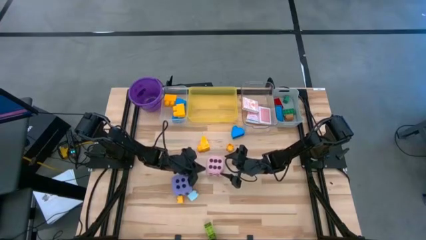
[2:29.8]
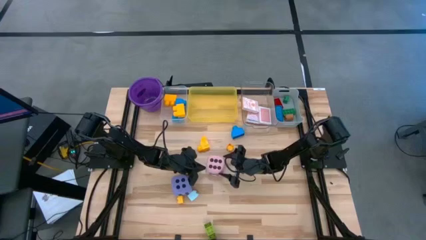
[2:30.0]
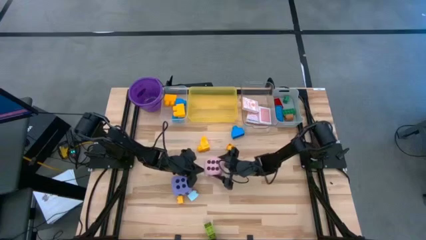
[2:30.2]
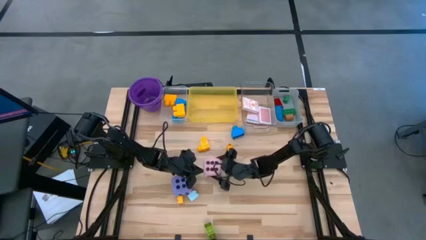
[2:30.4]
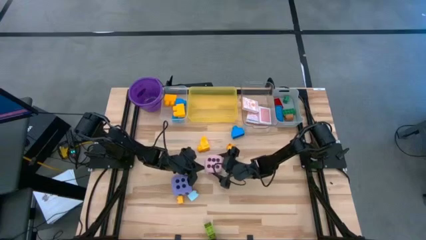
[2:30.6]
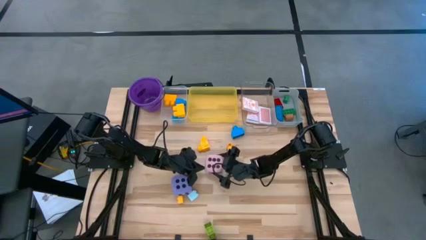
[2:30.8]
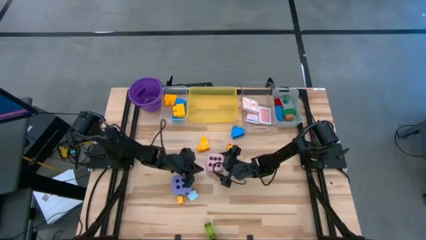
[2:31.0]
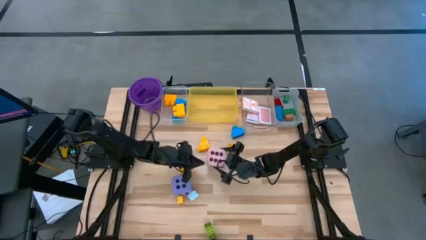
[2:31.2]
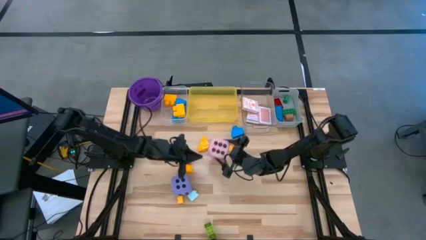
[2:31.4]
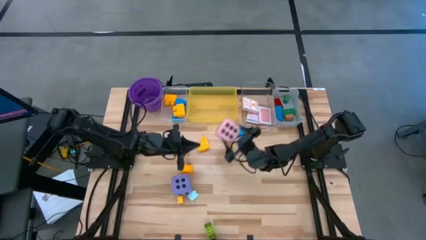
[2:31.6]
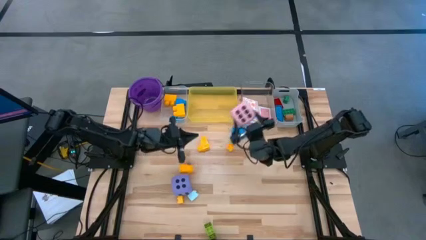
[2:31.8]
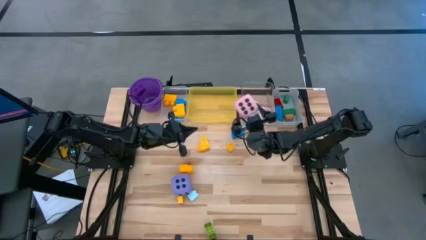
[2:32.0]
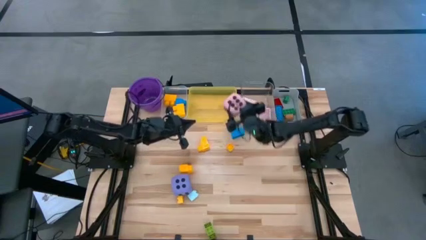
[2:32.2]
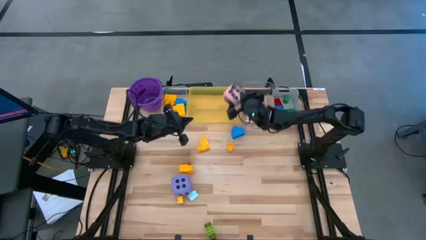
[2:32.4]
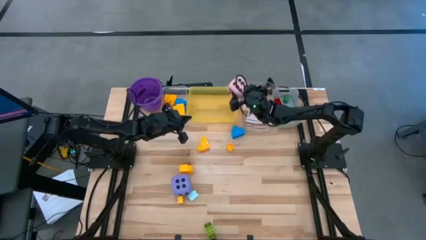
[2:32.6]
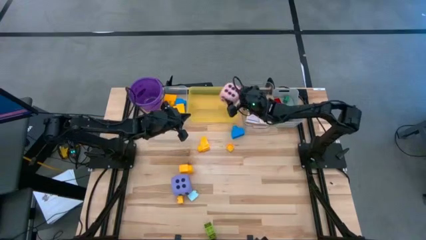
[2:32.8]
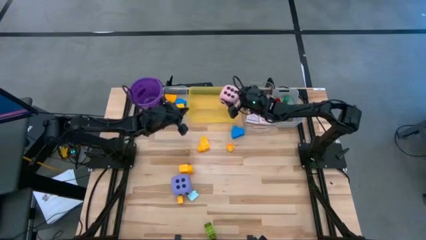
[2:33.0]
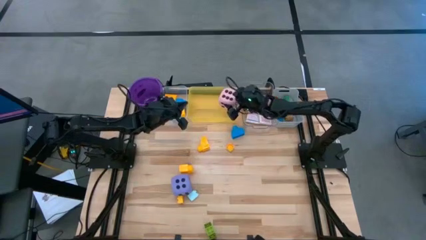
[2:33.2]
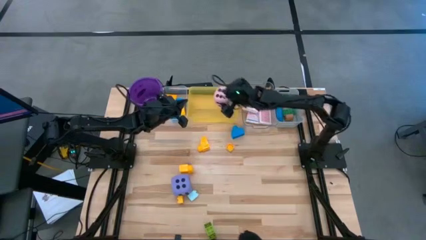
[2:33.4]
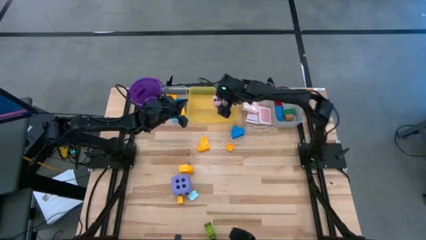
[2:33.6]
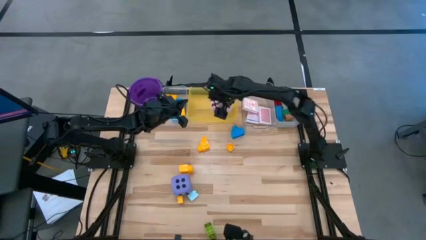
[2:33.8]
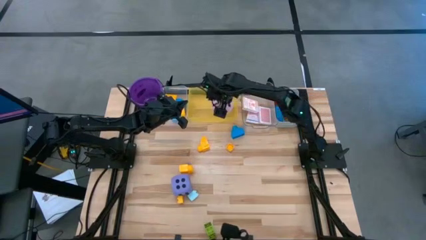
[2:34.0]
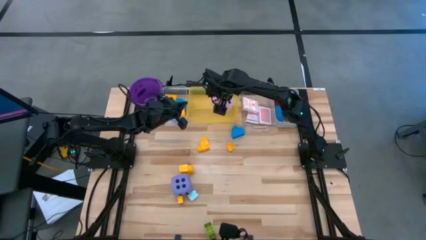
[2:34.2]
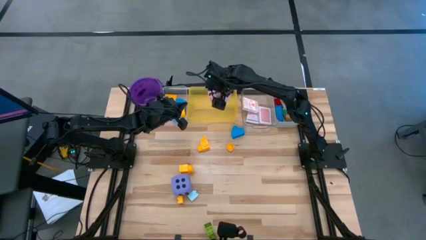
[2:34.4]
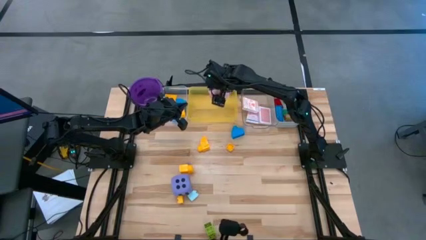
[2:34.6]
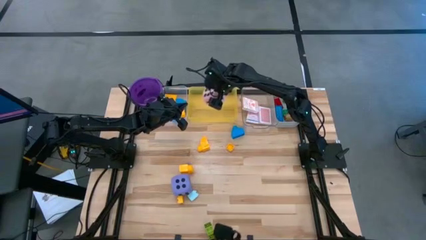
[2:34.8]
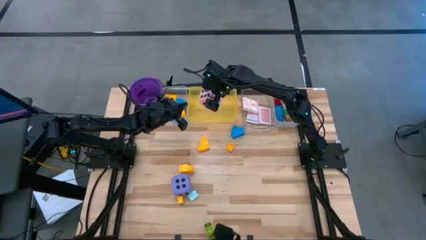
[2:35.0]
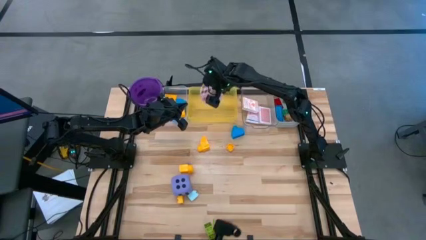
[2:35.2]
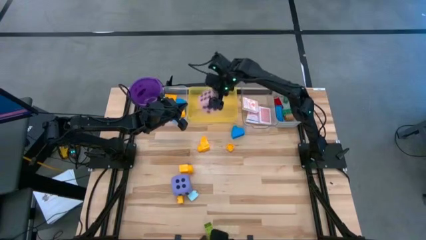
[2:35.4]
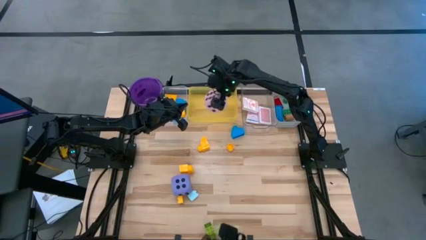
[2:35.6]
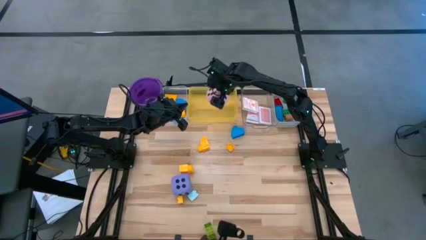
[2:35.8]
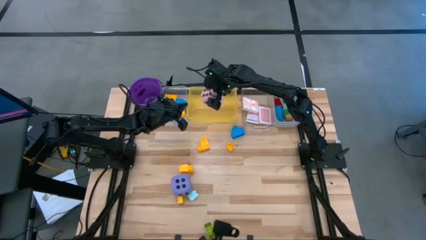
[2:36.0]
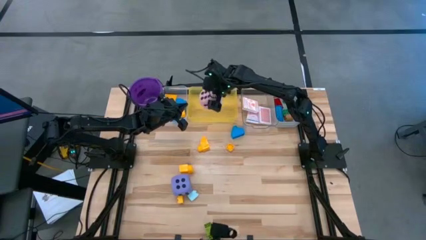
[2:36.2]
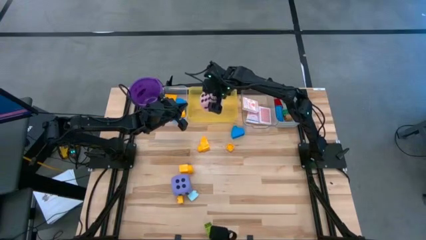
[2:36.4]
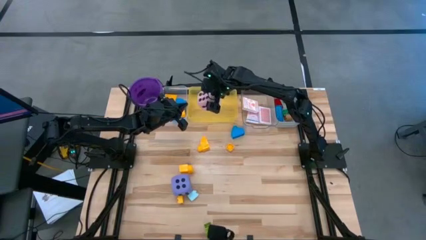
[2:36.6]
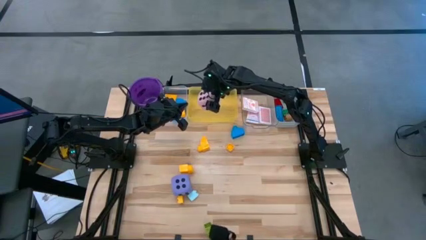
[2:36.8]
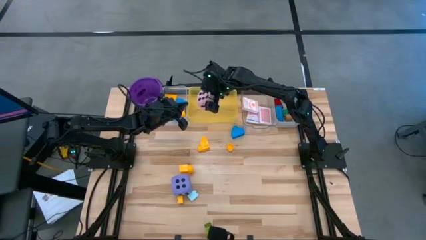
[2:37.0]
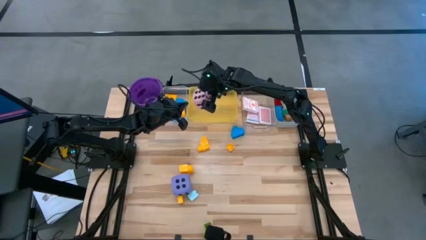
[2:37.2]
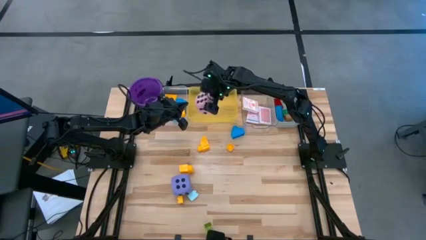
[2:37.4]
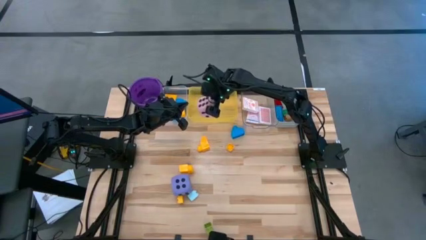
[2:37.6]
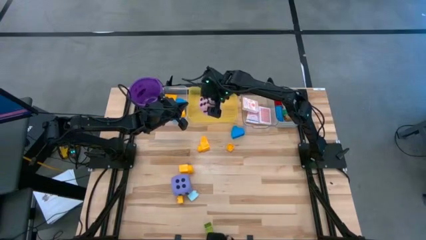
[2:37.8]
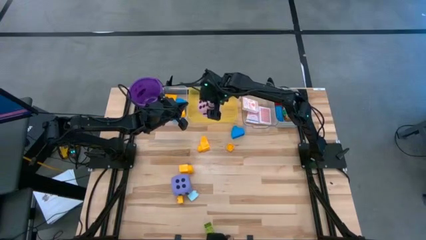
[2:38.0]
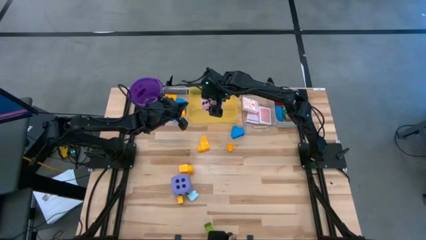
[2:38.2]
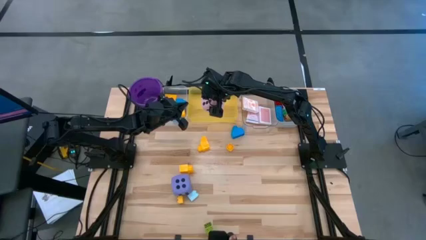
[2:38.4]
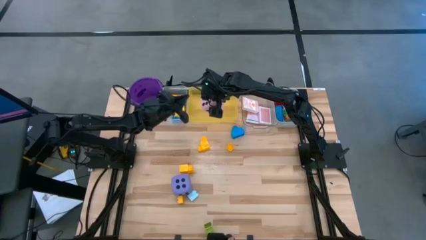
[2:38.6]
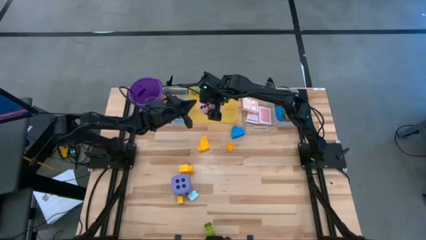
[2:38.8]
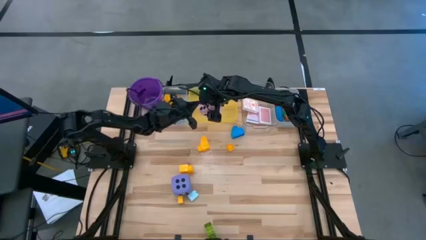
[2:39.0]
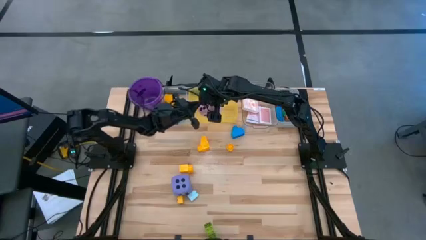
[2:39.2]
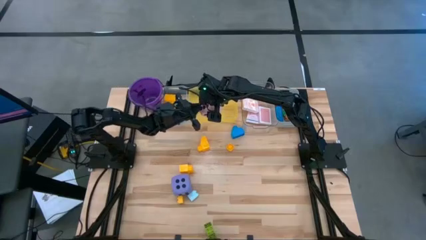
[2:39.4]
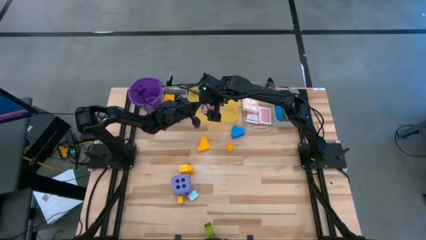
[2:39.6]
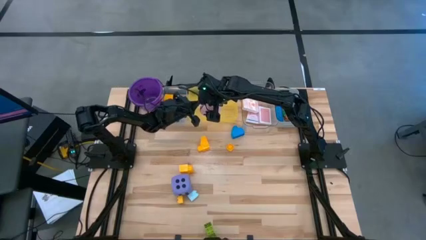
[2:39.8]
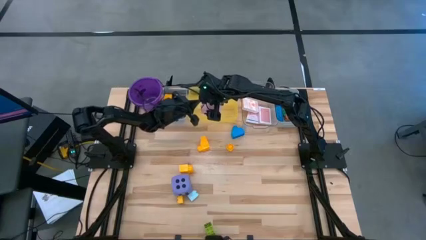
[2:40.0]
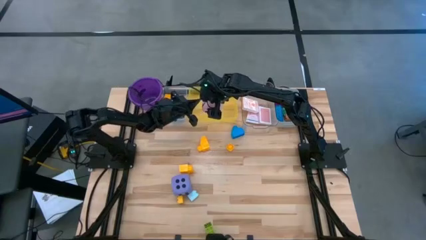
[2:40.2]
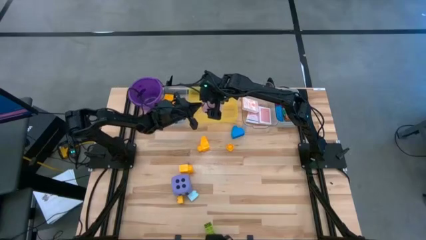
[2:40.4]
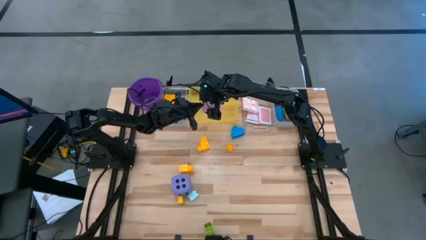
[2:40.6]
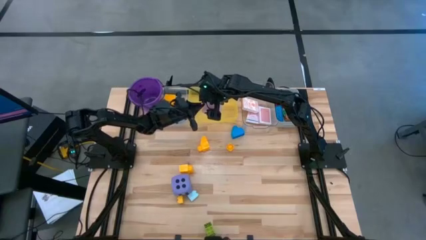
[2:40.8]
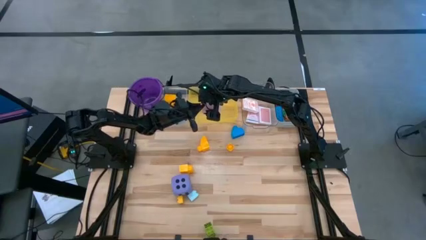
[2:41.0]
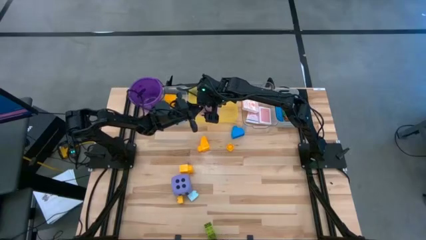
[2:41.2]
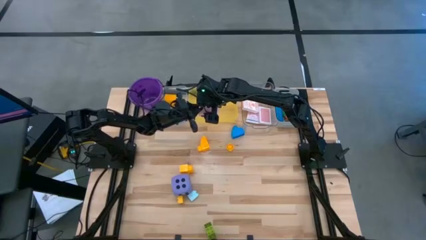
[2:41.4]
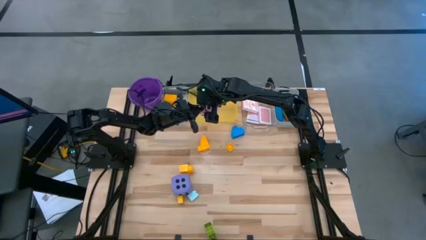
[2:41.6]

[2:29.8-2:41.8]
Task: Pick & Place Toys
Put the pink dice into the yellow transparent bin

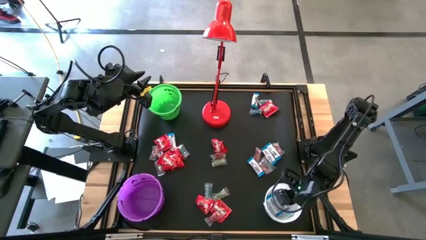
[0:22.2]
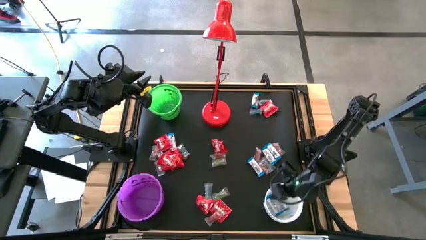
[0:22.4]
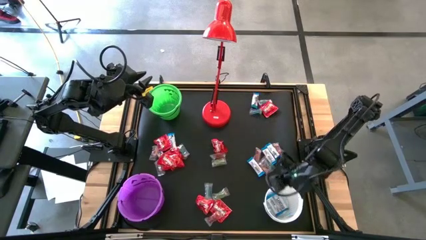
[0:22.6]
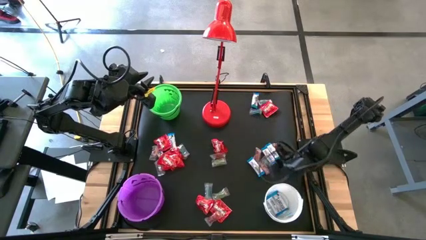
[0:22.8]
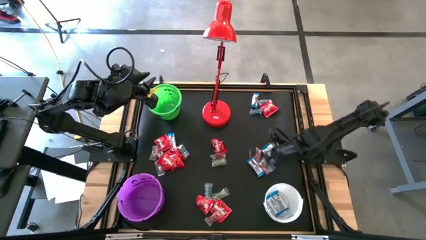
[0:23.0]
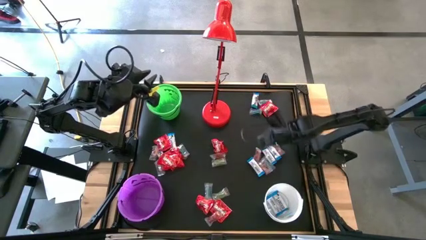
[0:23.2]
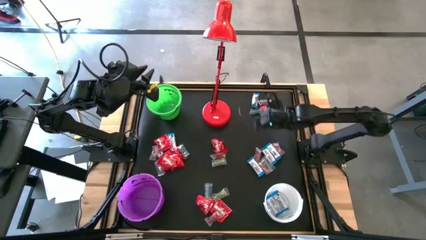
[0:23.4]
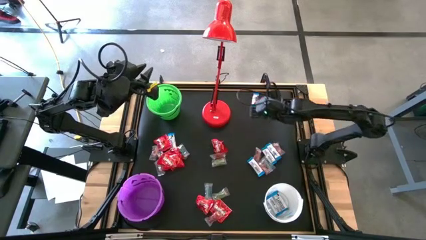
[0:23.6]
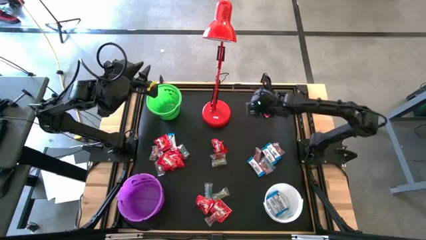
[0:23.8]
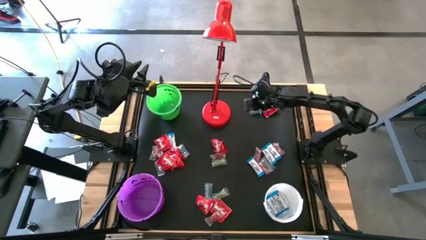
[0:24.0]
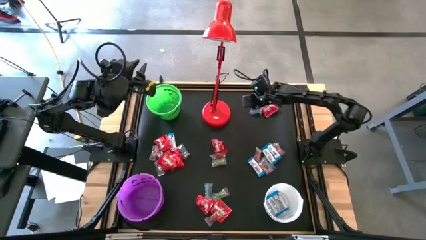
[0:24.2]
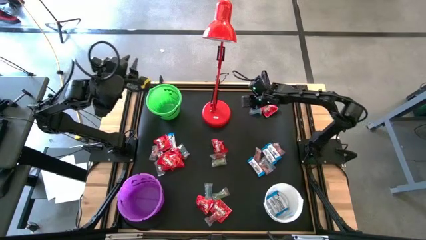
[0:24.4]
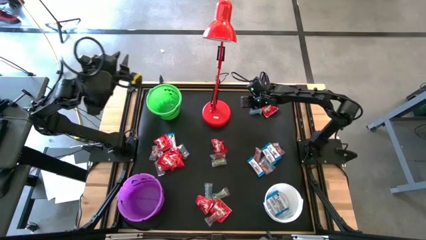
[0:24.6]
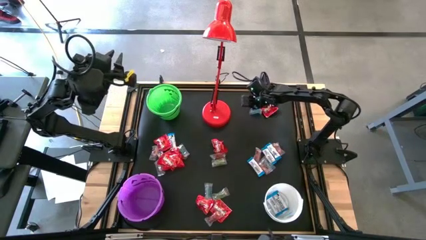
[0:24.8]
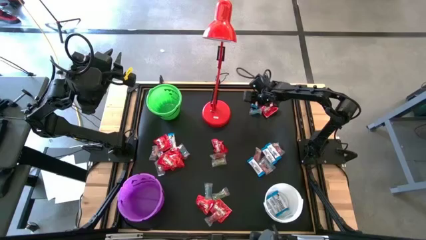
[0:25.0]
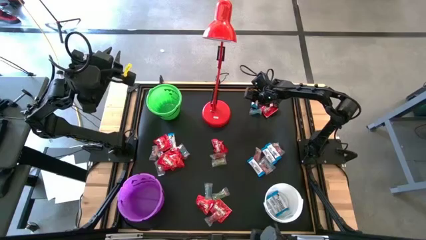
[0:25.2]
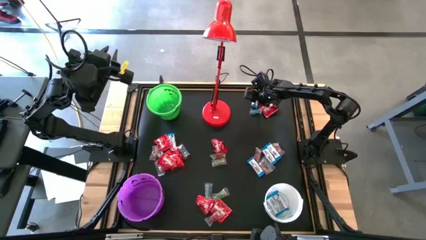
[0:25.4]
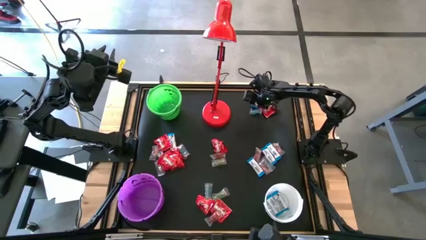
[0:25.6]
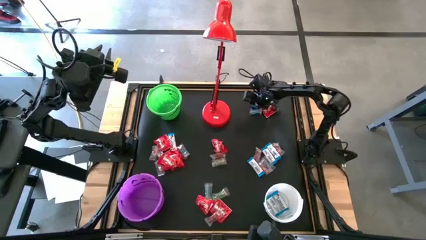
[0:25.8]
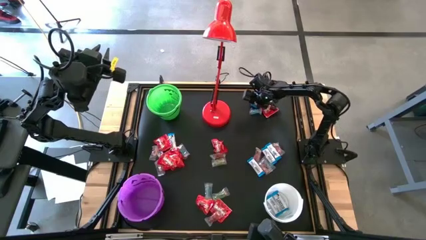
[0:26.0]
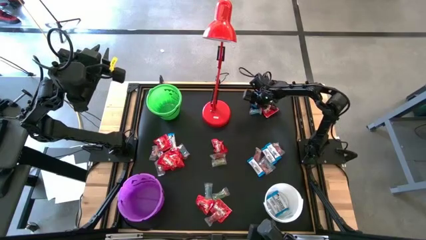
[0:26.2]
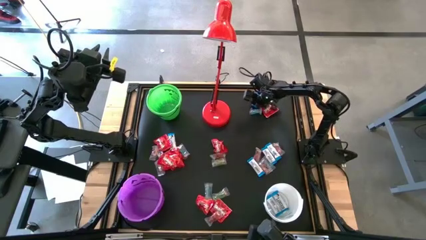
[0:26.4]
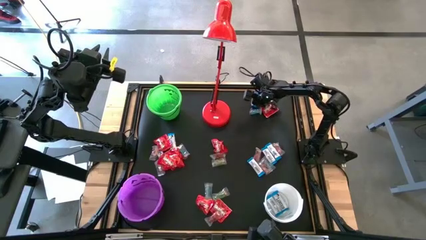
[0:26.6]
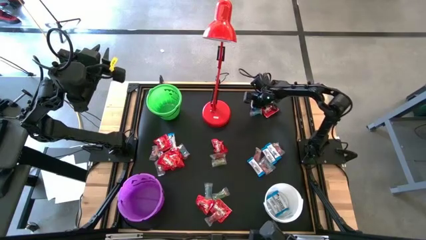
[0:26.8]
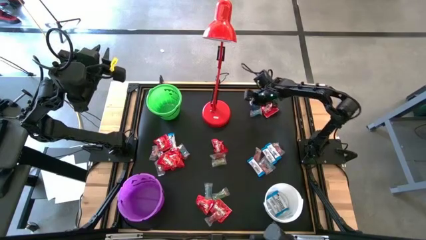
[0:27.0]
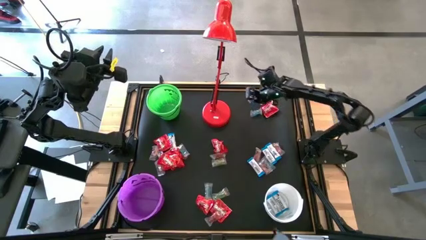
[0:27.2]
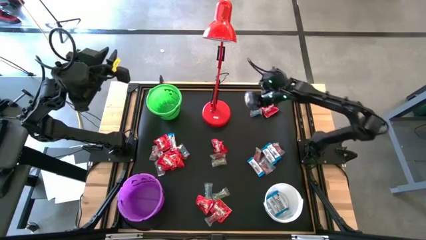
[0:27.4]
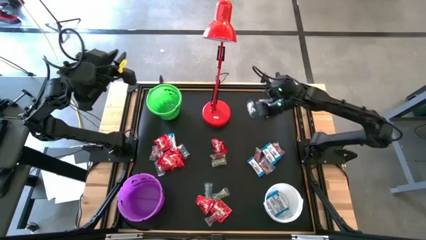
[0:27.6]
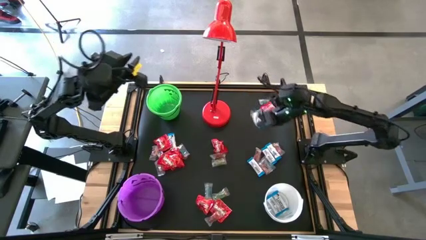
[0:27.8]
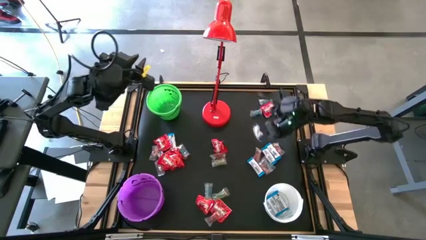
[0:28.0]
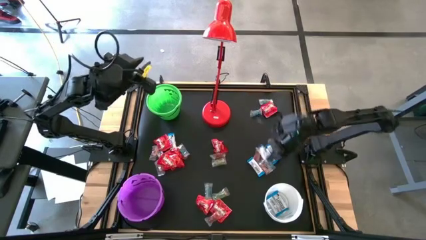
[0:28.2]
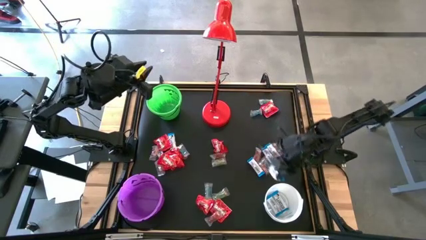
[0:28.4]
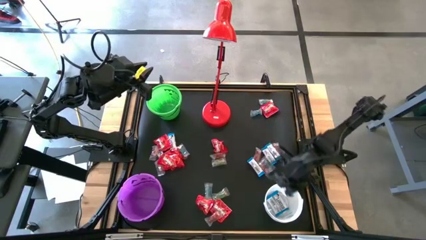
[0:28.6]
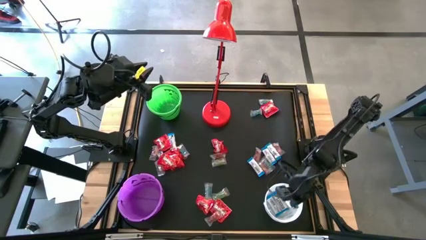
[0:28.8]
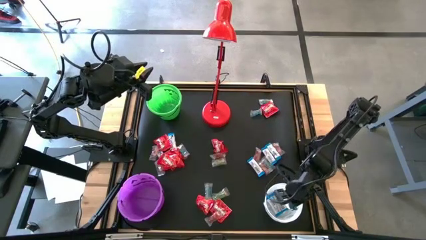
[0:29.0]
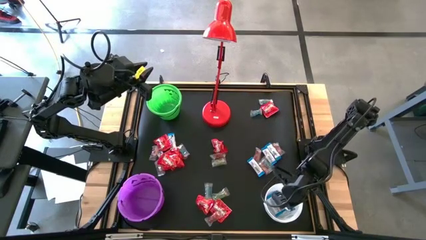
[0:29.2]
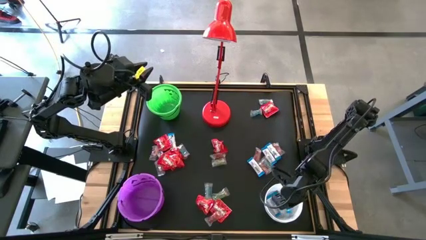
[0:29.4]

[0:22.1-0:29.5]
Task: Sort candy
Put the white chocolate into the white bucket
